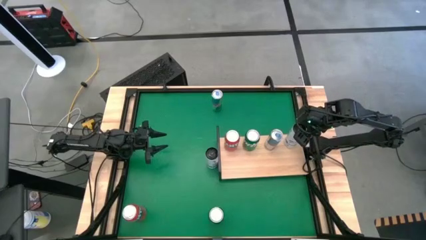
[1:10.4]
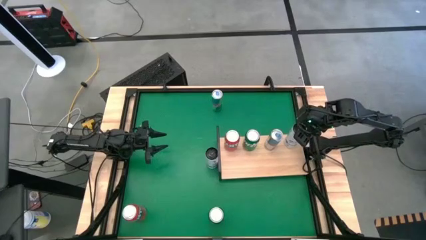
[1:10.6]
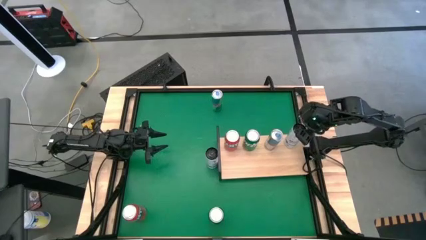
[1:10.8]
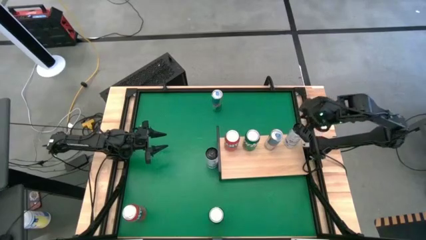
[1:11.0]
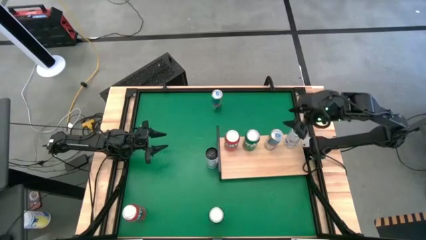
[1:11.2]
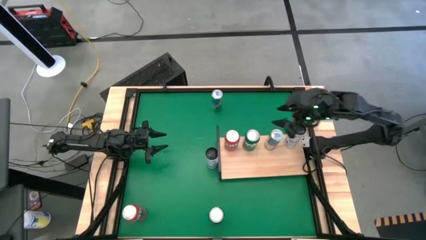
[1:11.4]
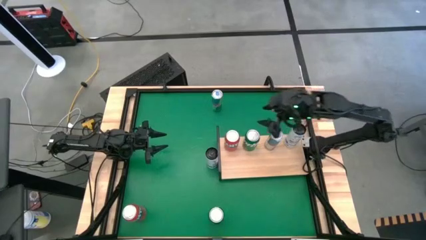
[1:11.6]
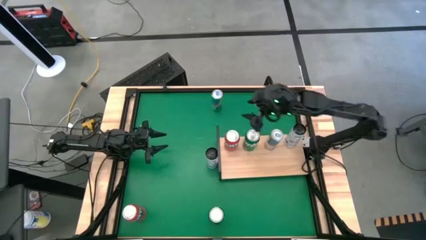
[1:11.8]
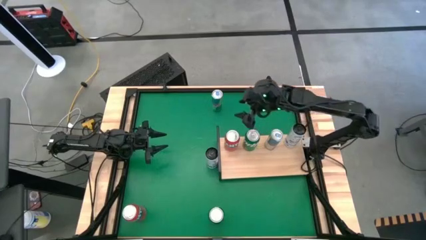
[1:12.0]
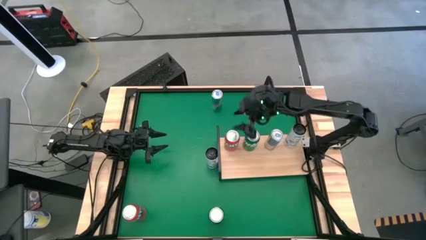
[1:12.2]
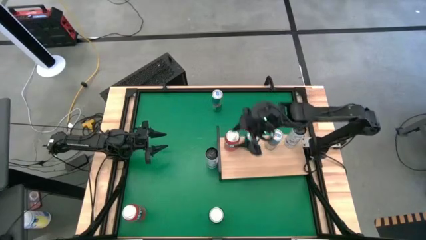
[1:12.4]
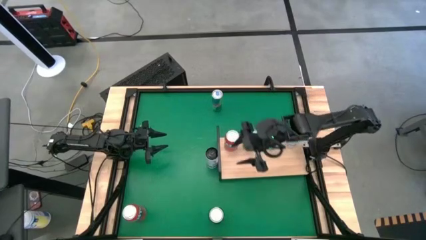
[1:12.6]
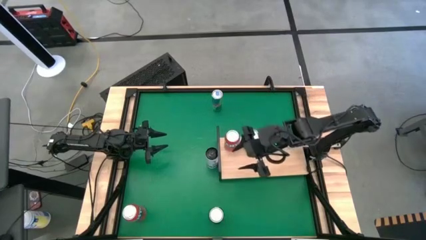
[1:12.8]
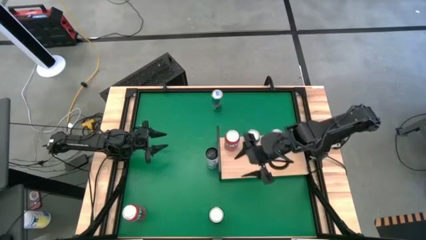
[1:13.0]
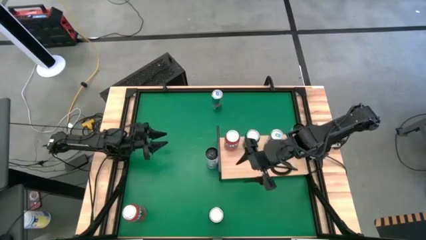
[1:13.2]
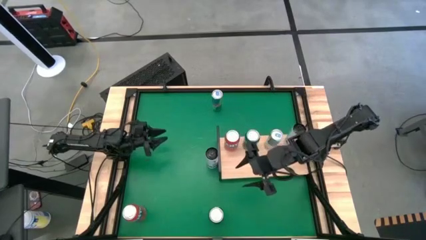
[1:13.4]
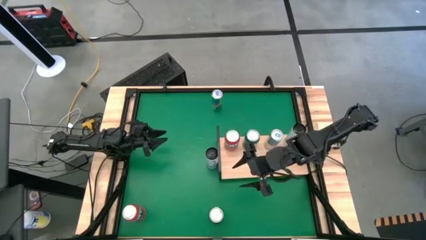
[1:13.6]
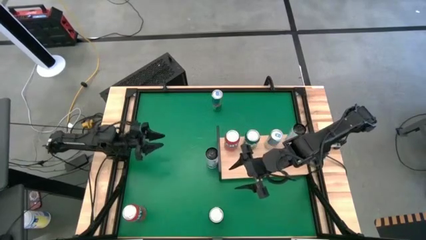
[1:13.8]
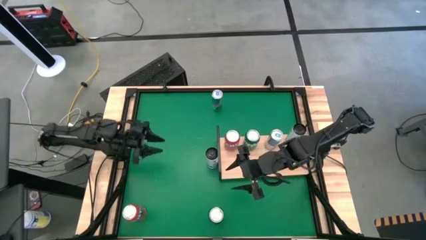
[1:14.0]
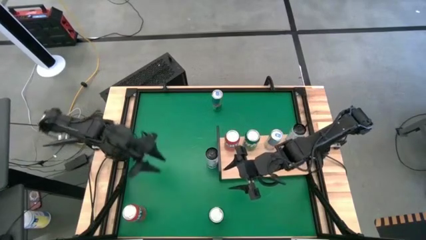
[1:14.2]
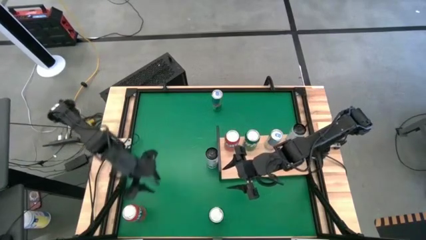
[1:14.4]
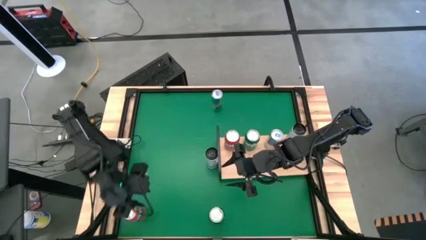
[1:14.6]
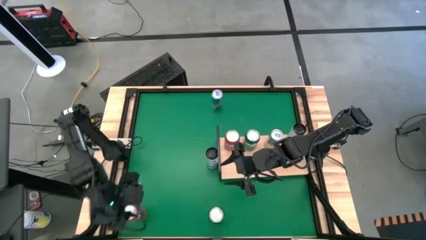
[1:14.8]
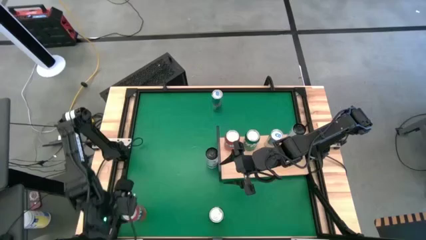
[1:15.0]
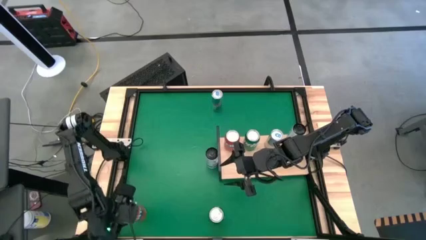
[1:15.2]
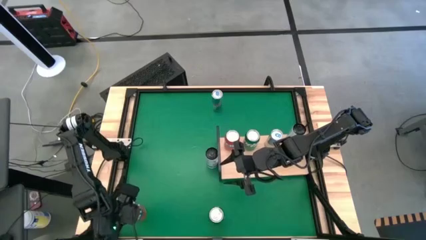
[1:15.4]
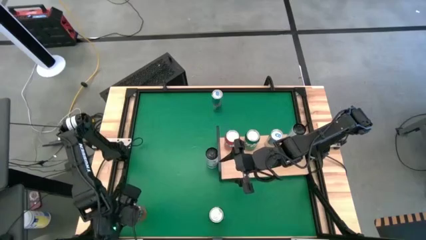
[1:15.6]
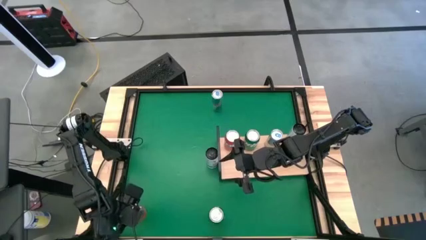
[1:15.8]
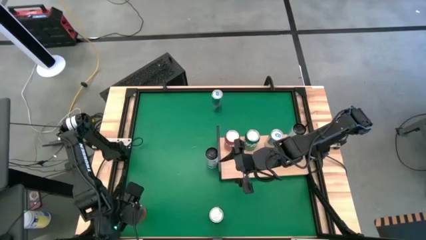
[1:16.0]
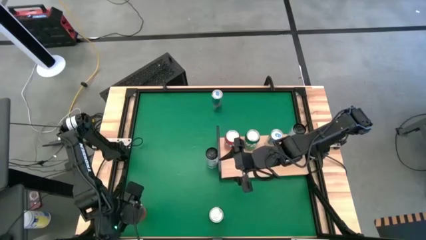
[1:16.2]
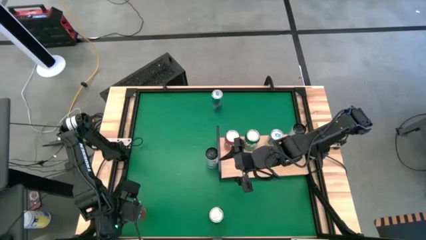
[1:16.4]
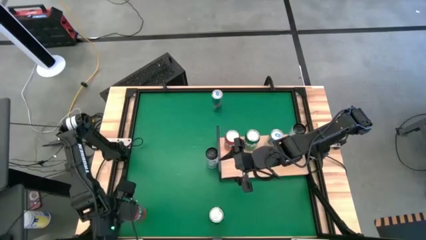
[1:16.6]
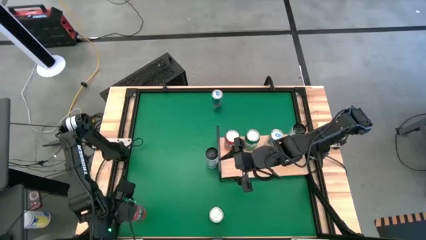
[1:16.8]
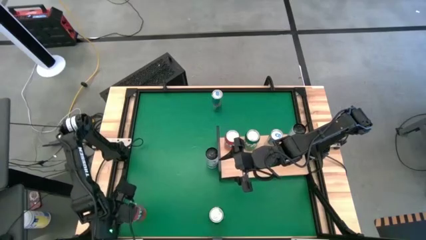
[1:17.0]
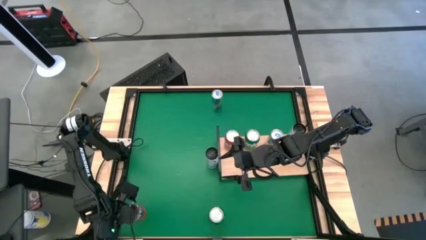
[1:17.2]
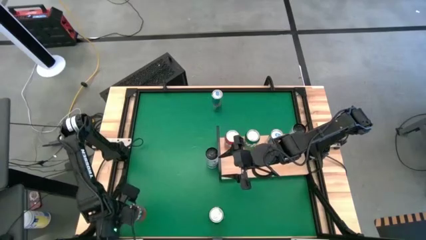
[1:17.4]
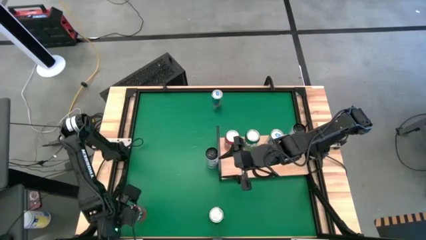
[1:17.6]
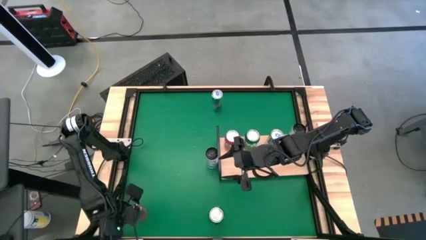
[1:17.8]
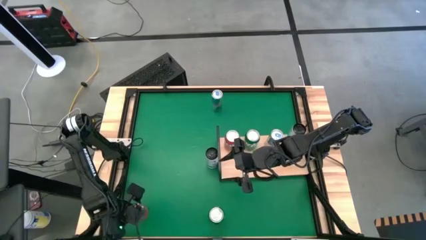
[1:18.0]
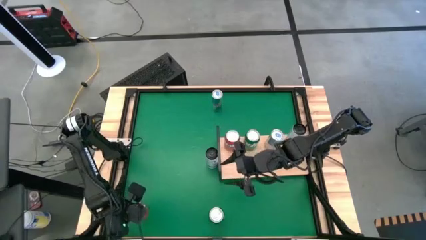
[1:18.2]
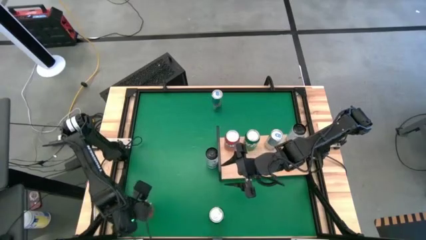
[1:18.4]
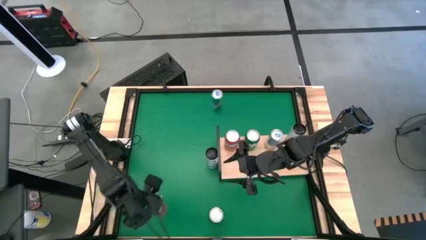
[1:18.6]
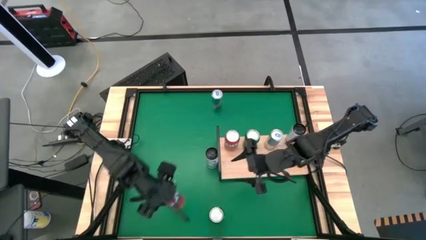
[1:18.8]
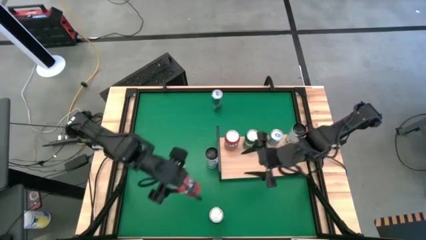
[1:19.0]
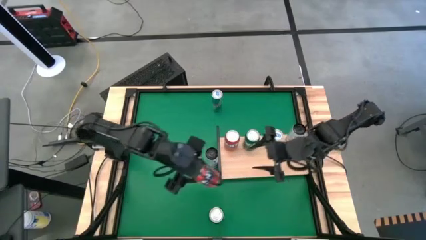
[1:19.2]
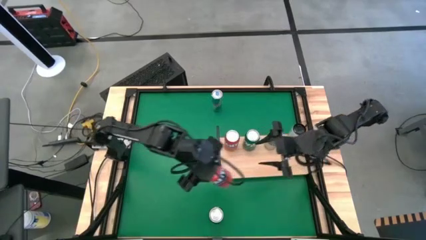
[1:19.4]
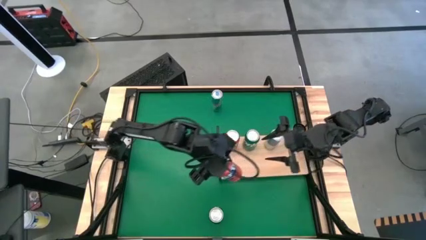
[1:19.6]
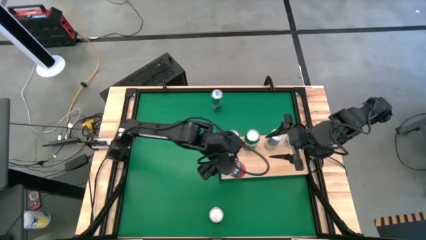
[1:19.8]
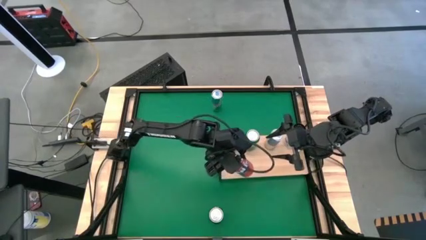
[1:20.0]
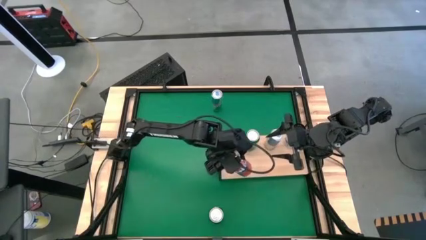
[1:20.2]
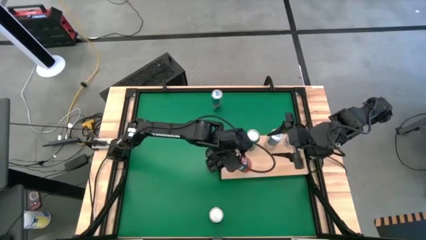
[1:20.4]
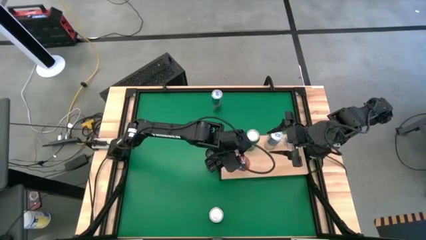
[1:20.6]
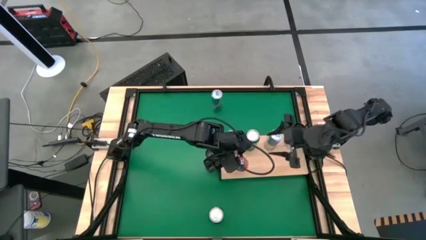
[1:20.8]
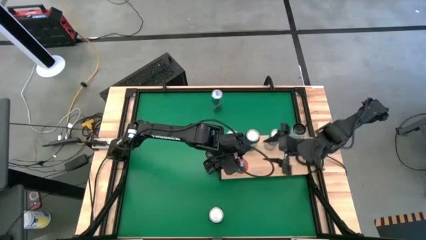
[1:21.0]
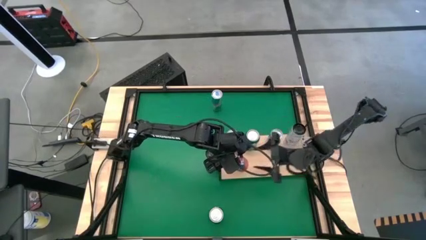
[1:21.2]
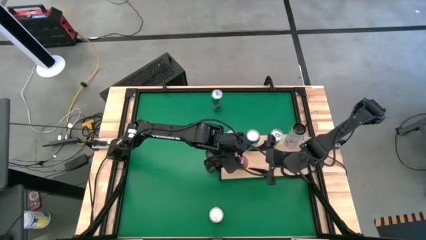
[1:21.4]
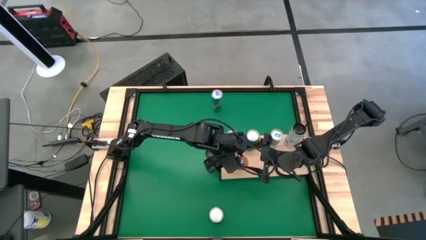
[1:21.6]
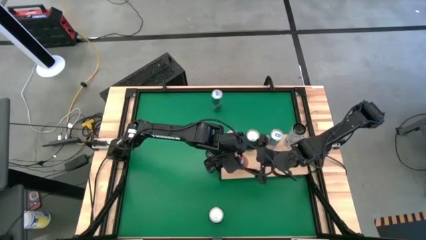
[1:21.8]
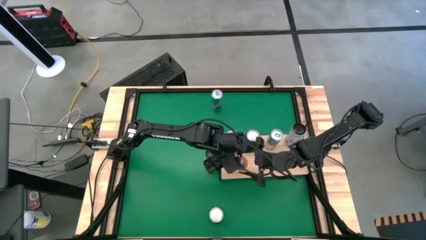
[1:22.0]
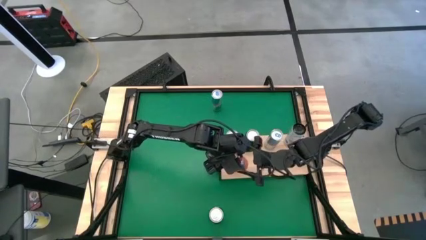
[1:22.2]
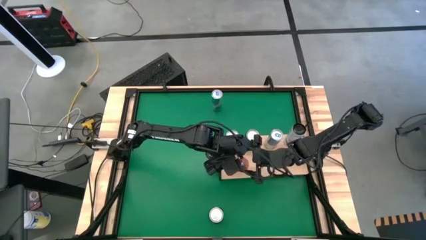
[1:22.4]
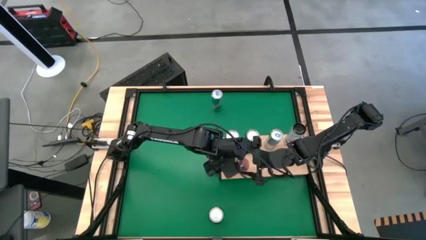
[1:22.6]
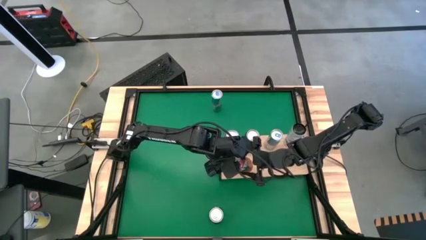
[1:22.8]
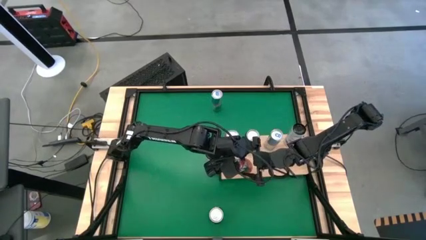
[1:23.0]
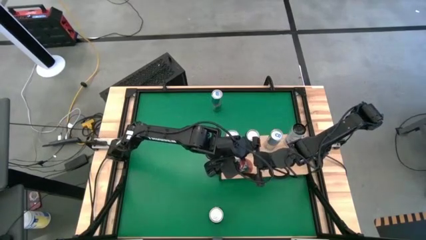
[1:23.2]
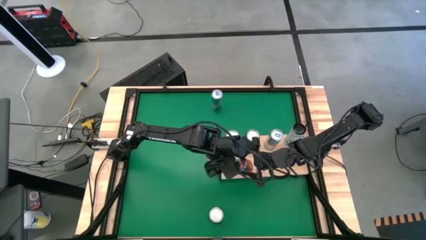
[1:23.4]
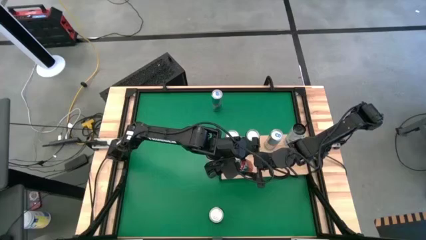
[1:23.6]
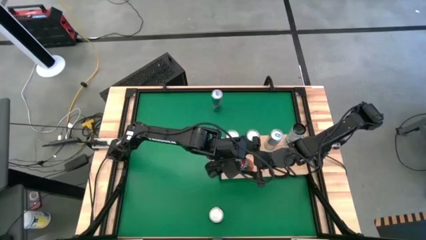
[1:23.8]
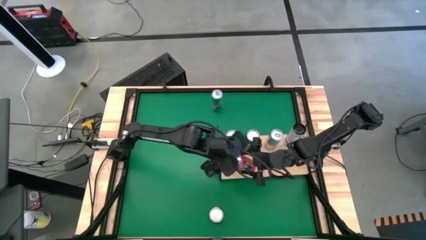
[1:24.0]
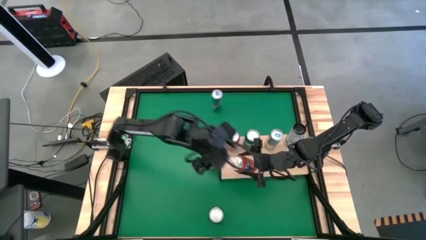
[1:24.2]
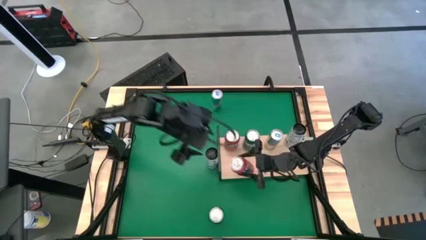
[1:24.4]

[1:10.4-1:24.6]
Task: Place canned beverage on shelf
Put the orange soda can on the shelf

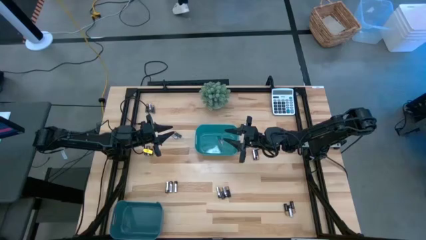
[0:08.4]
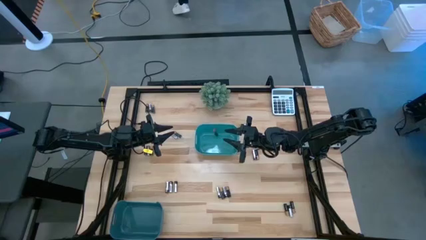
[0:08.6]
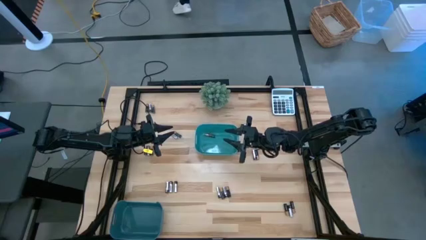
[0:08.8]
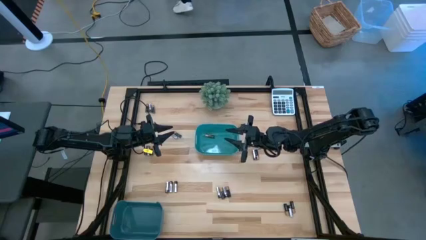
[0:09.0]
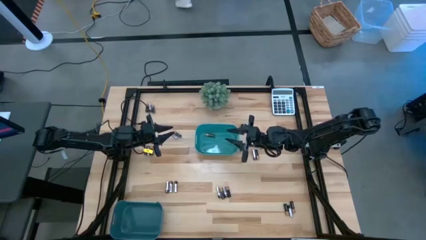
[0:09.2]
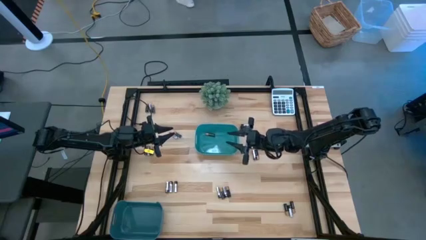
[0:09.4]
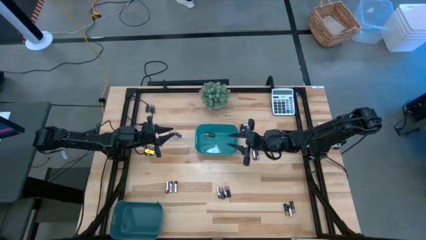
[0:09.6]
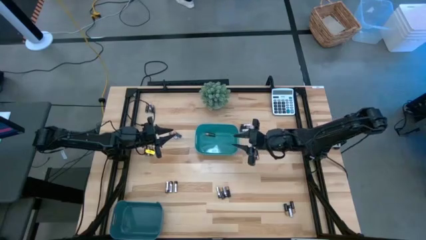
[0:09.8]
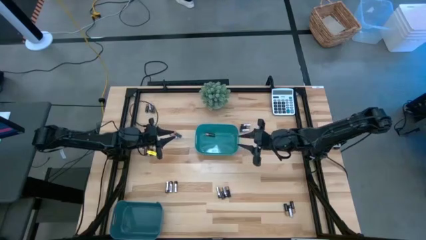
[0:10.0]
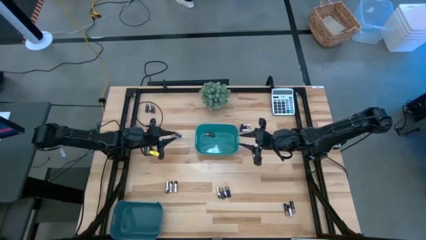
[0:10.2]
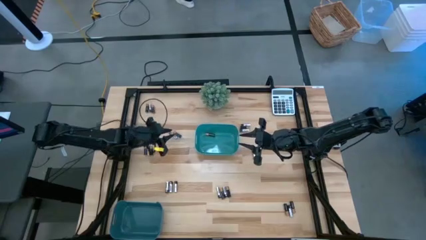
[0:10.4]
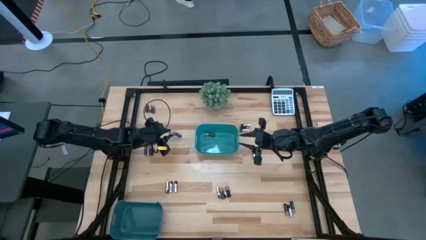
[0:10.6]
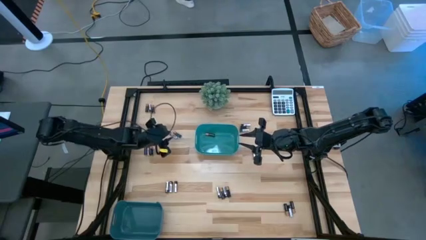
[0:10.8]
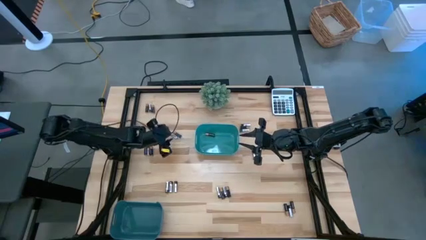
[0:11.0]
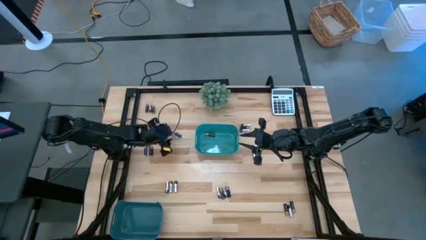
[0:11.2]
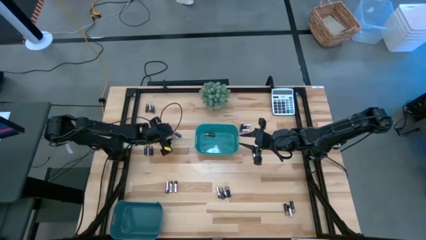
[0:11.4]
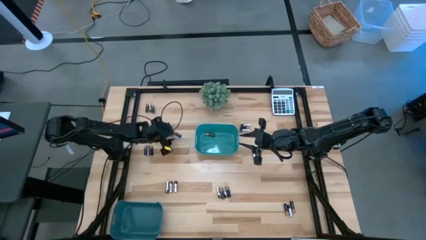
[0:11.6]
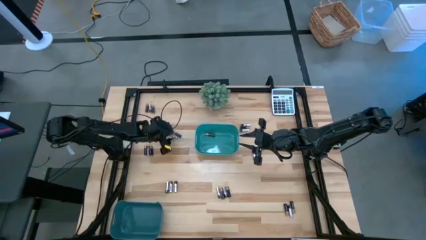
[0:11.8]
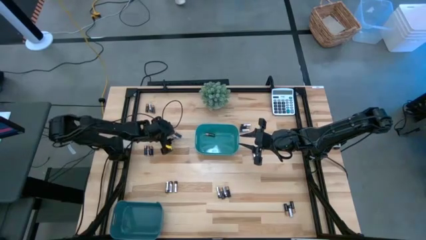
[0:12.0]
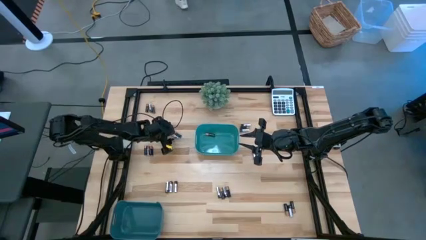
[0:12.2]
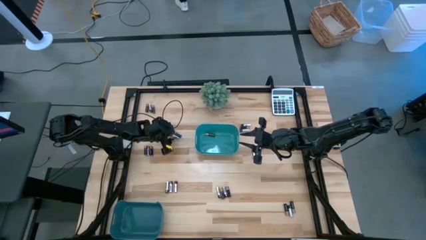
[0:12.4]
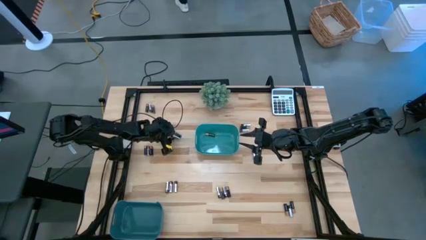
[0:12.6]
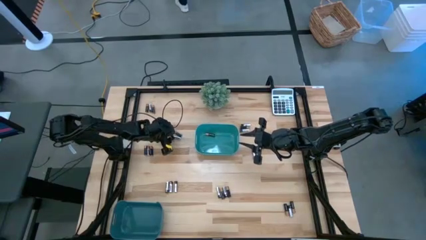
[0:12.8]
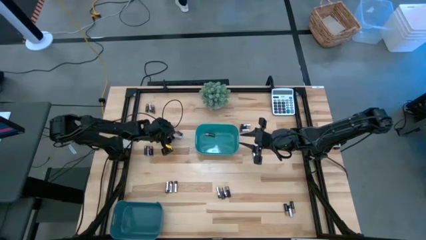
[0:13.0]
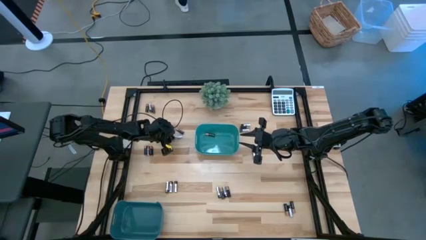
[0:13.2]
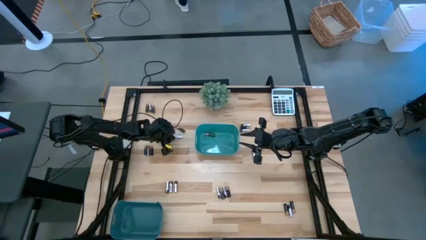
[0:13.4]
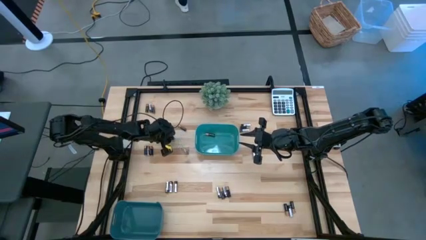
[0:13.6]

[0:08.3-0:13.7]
Task: Sort batteries
Put the silver battery into the blue bin
